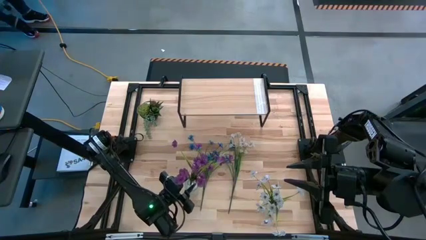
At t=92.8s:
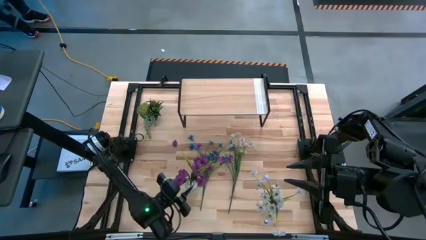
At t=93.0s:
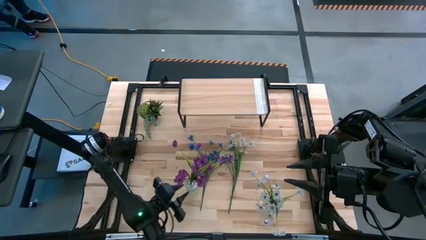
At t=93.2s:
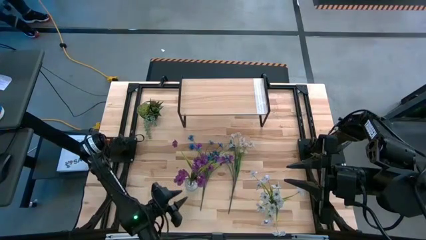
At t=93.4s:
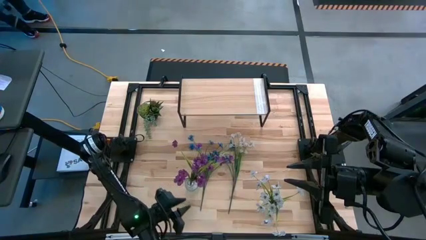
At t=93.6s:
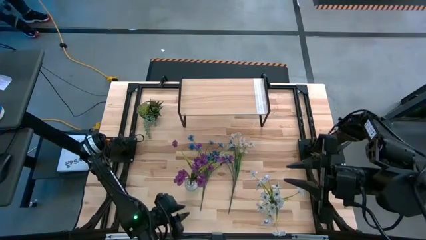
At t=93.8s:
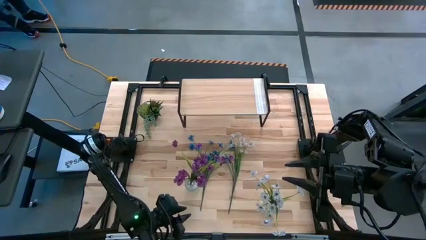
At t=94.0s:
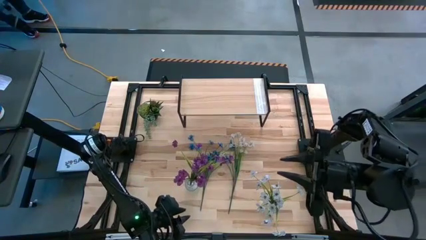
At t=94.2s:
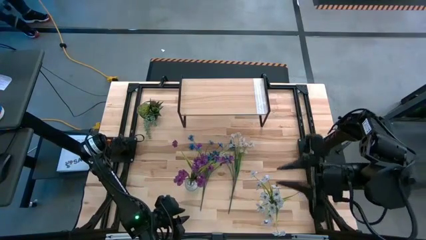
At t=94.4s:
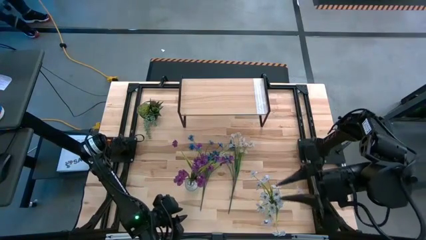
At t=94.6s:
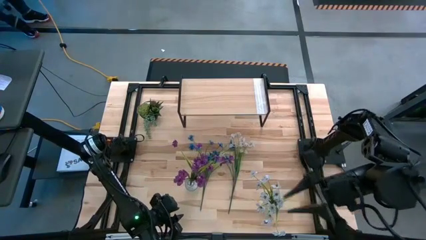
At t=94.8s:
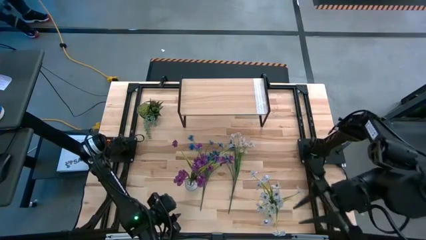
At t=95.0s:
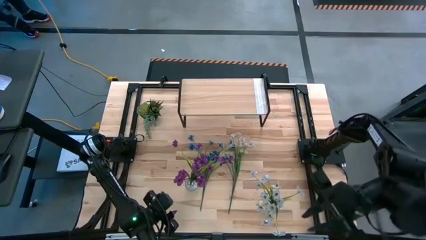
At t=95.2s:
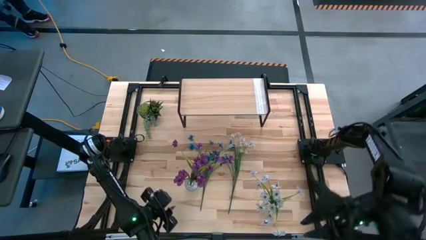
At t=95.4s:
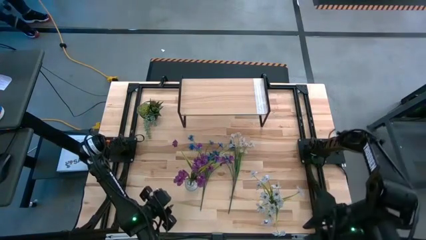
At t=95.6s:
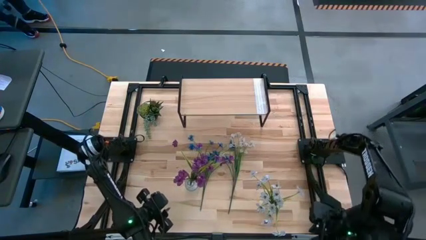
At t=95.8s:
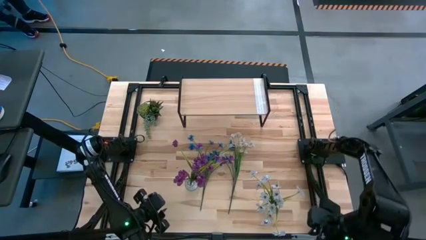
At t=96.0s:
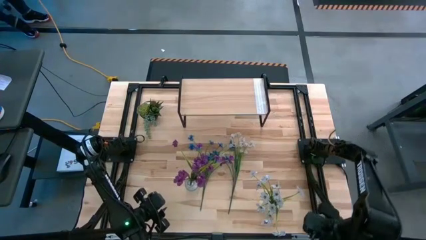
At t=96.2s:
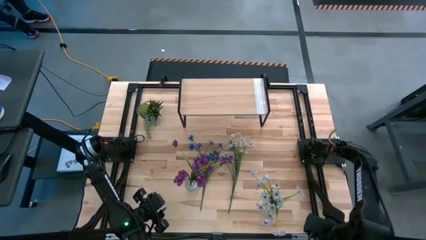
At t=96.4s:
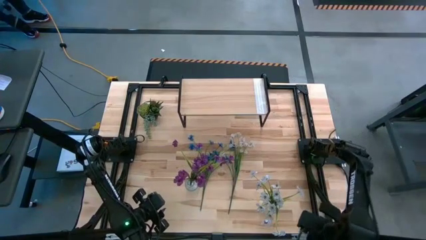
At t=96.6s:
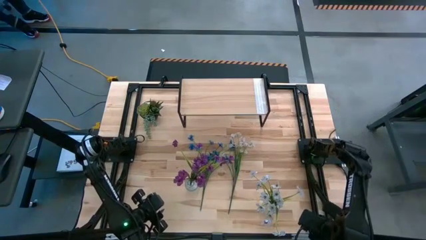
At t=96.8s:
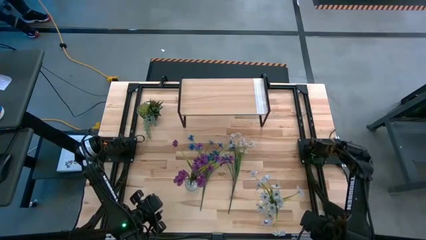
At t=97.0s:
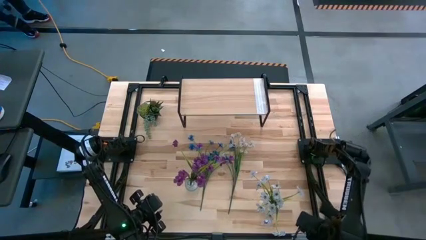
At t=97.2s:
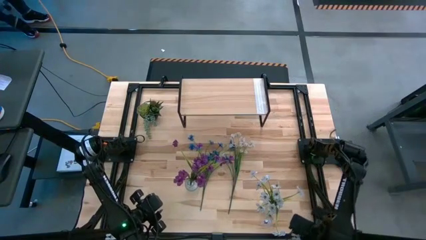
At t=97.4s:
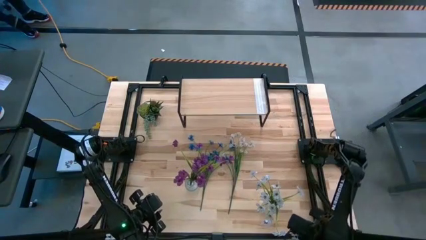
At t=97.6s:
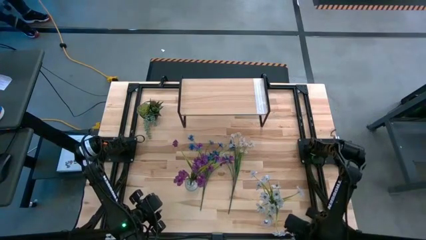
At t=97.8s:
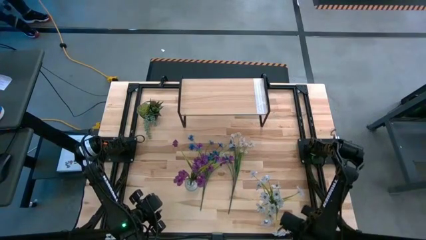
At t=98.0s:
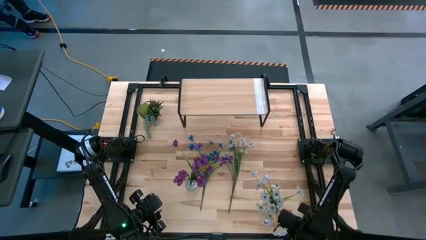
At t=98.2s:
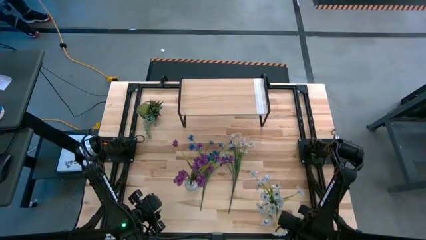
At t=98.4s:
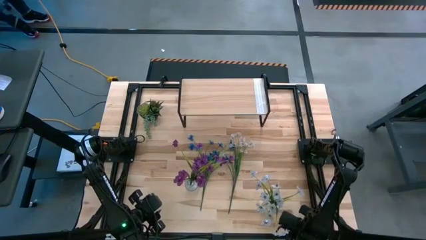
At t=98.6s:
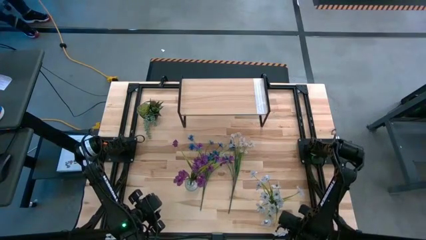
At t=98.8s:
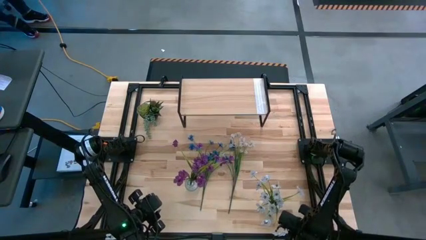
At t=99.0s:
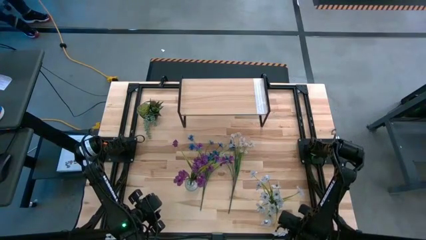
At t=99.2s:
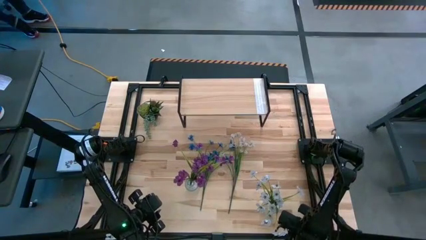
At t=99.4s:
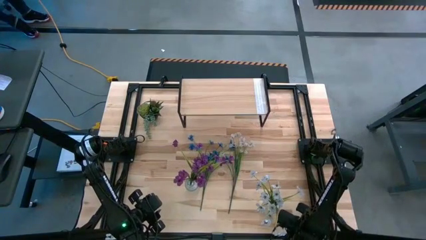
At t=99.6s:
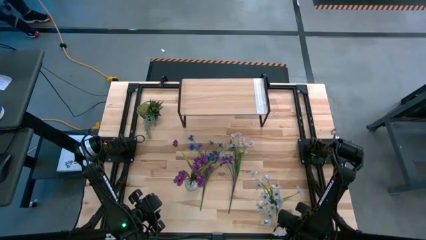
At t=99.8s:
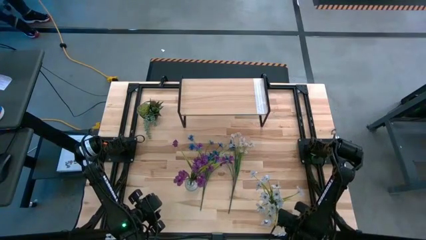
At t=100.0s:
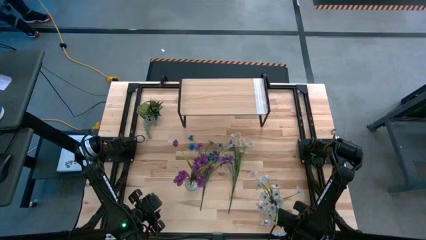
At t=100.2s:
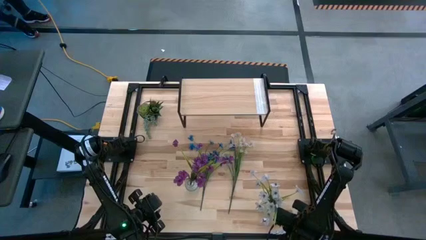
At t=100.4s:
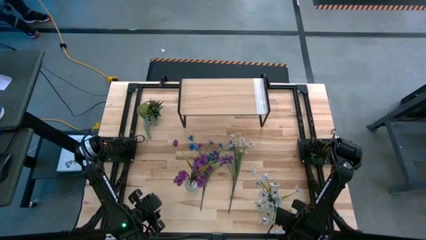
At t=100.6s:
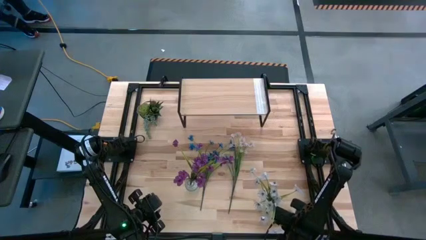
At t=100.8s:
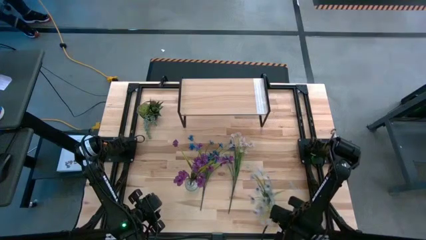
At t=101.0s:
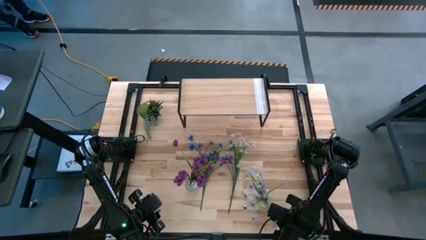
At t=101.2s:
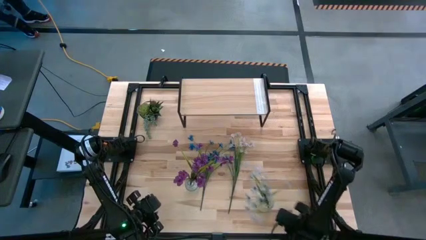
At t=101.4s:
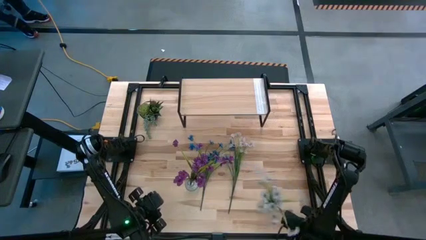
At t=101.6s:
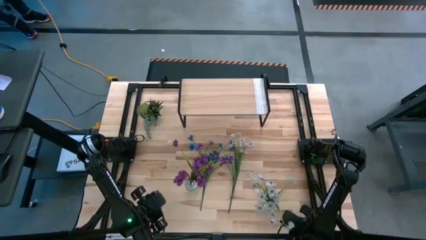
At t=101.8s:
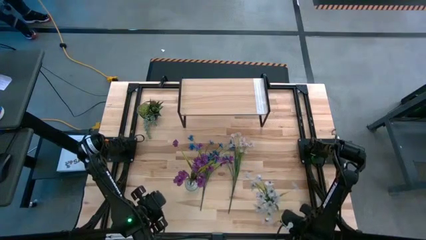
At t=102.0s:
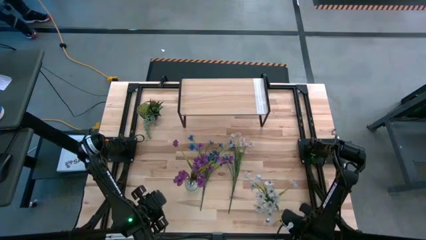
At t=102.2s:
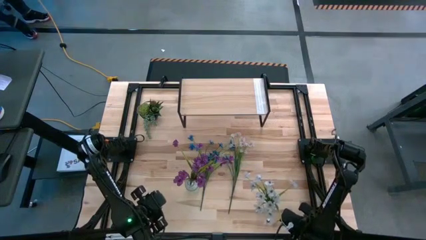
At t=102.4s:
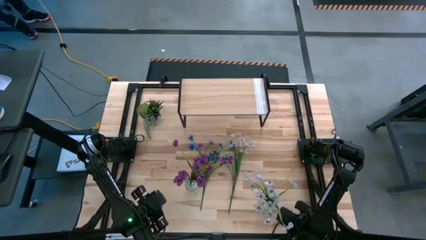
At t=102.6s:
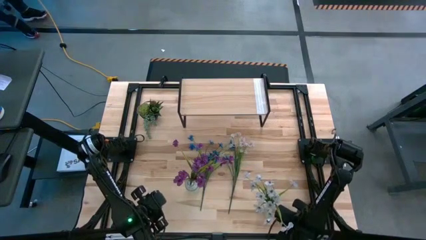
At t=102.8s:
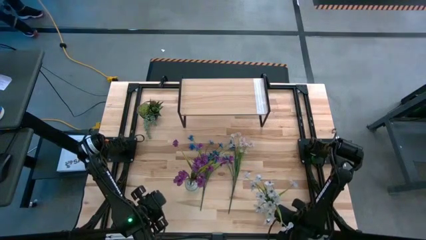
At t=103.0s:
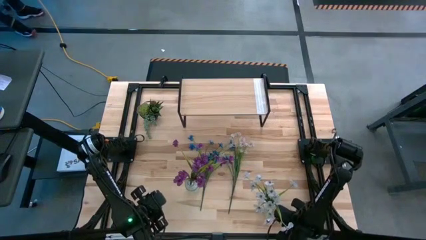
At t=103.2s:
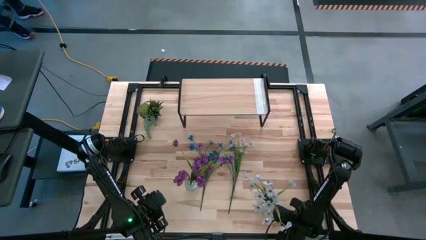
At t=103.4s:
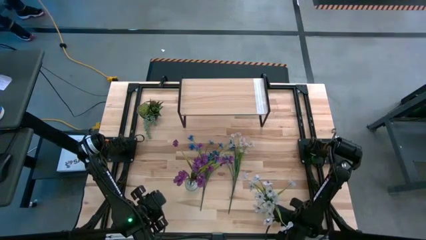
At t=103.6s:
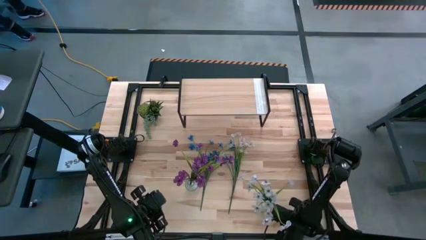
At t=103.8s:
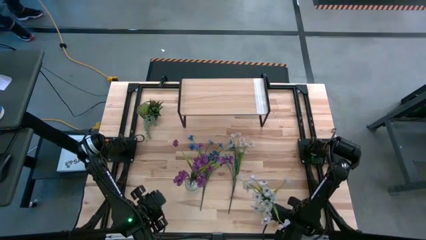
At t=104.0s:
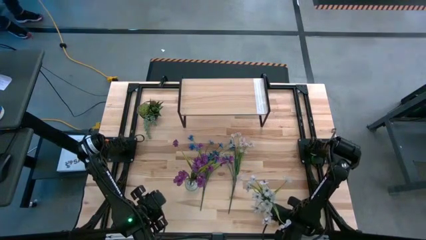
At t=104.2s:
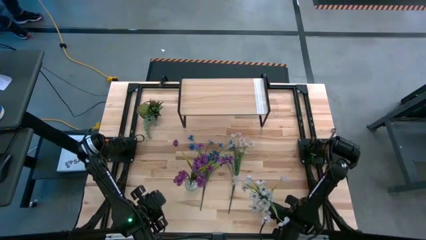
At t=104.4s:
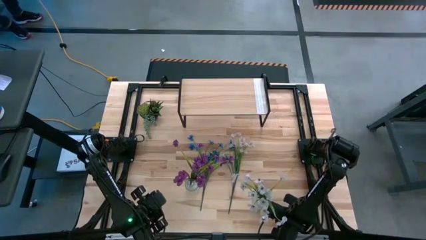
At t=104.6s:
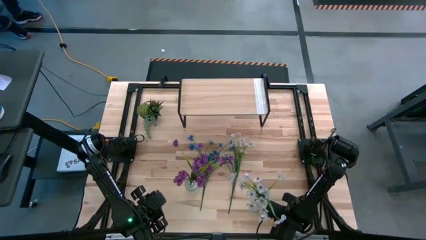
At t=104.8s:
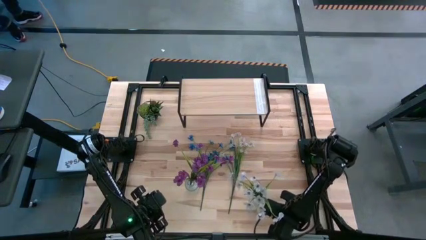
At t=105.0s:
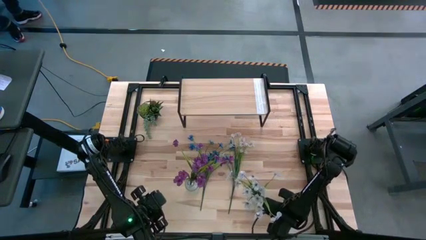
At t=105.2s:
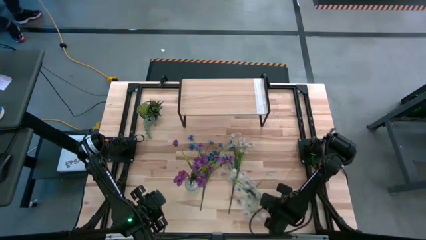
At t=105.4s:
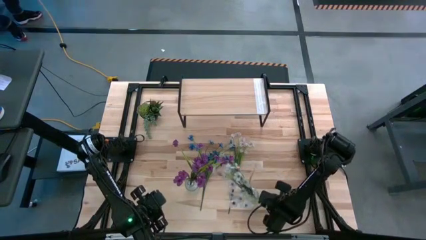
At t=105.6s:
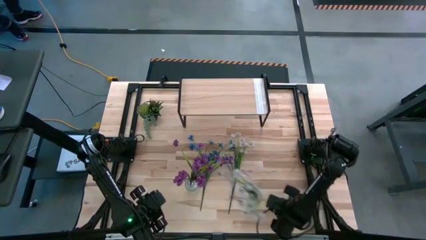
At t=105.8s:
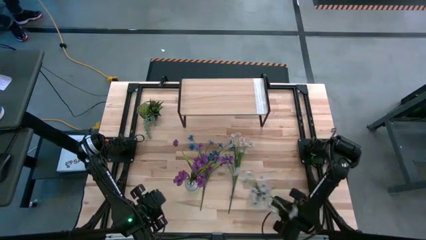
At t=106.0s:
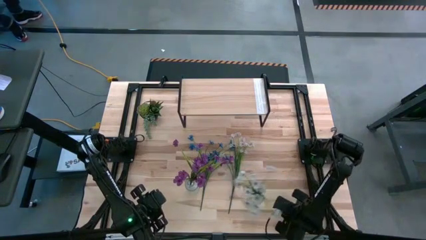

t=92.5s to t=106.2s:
Task: Pick and place flowers into a vace then onto a shelf
Adjust the right transparent vase

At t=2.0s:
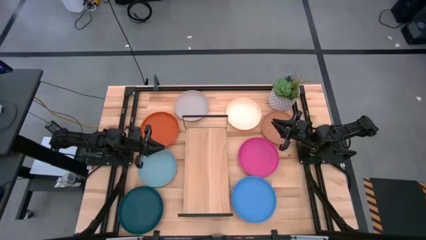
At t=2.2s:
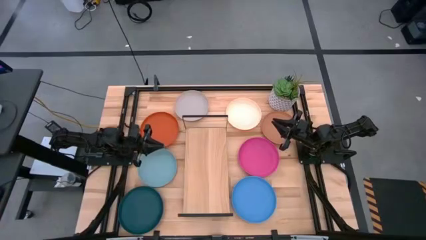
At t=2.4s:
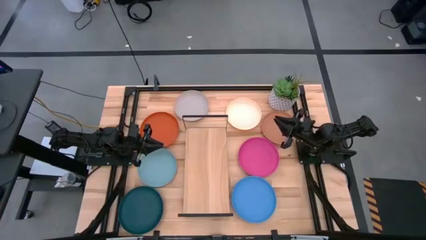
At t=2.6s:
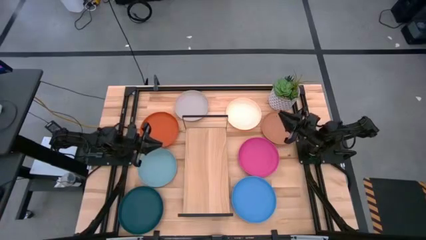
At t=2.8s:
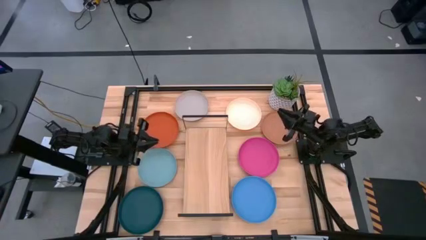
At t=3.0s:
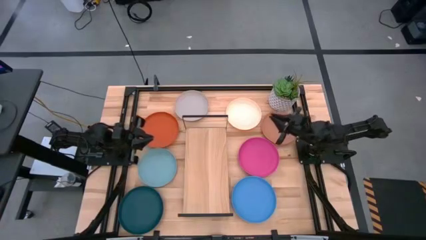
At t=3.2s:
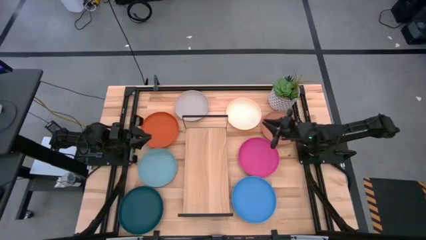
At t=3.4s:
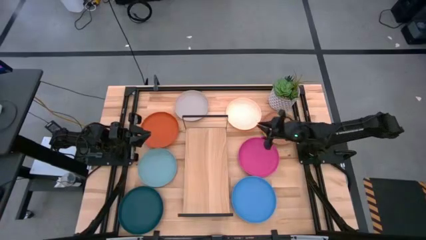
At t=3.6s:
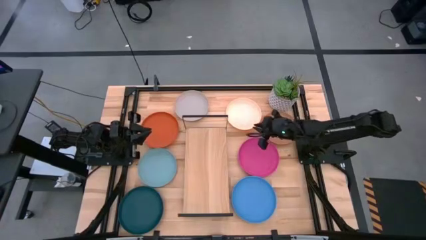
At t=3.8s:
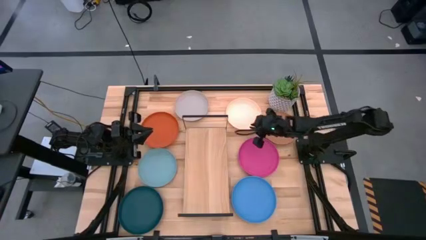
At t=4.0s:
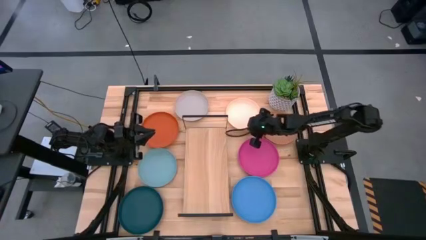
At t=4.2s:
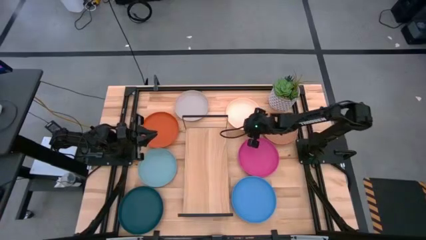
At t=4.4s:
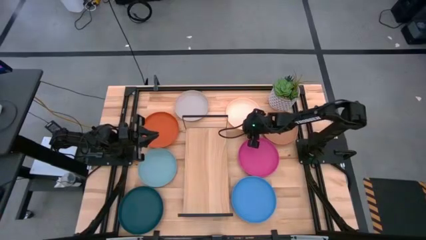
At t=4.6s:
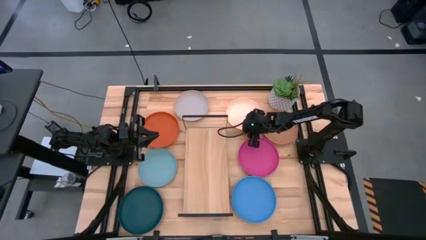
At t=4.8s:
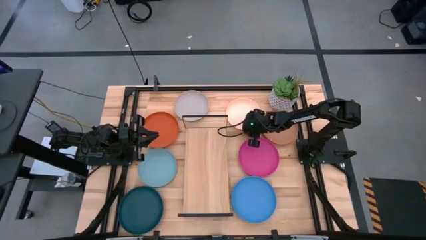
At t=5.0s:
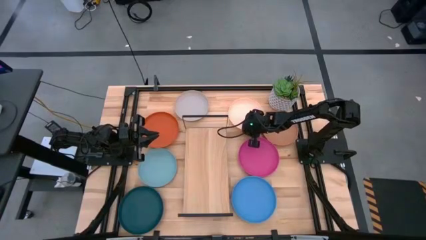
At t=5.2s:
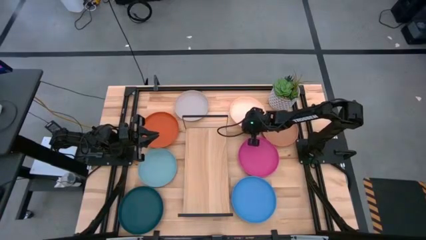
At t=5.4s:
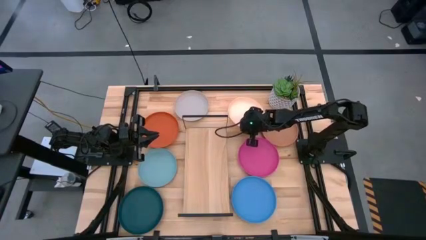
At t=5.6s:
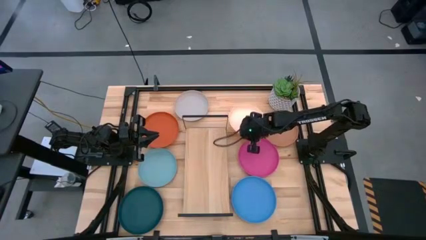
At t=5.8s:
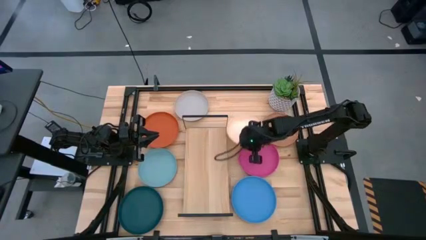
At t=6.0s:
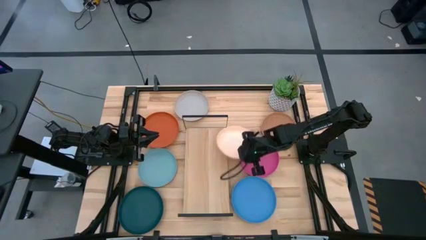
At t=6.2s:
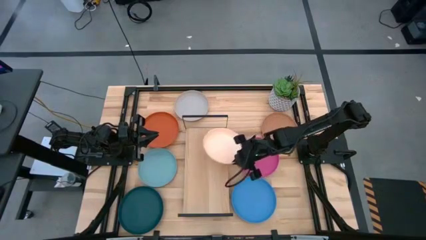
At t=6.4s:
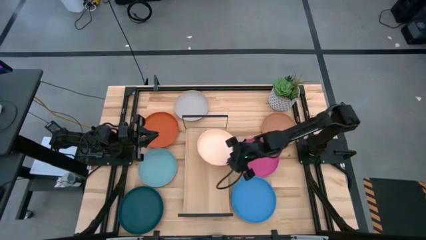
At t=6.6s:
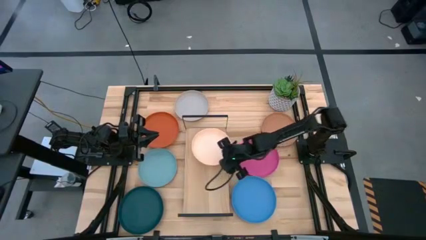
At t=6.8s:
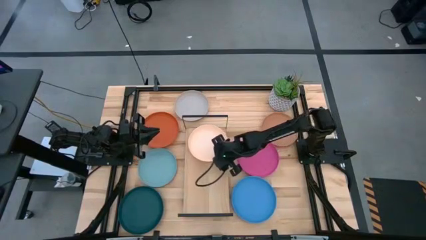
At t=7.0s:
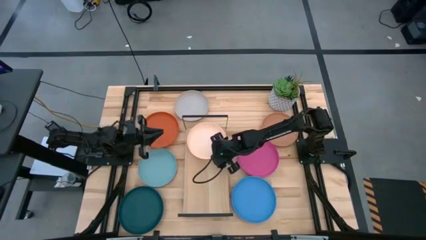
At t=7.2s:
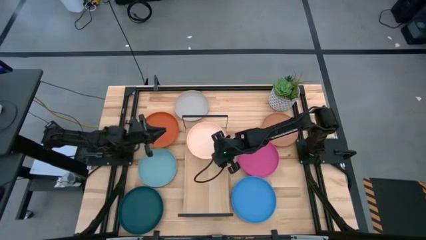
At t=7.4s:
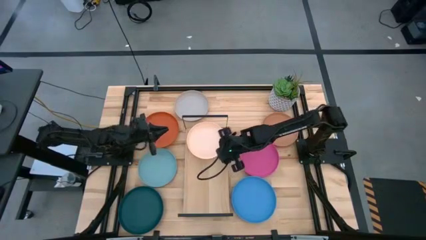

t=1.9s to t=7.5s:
Task: Place and stack plates onto a shelf
Put the light orange plate on the shelf
